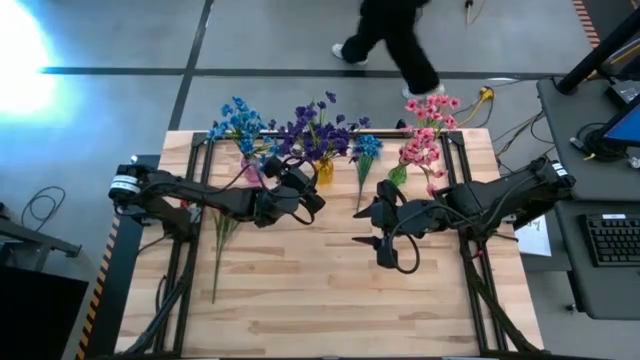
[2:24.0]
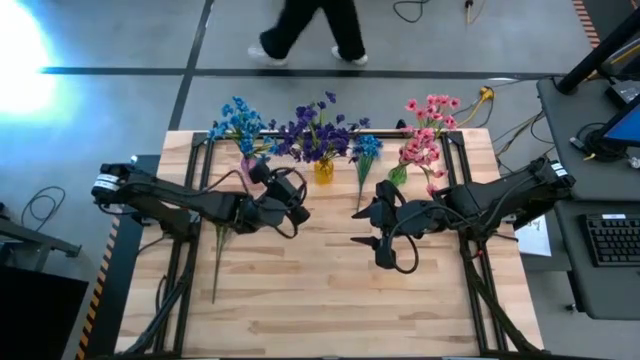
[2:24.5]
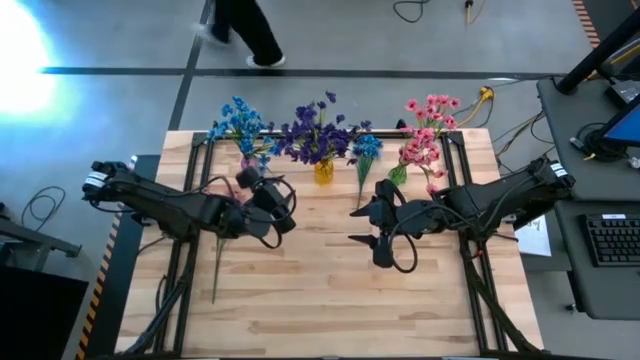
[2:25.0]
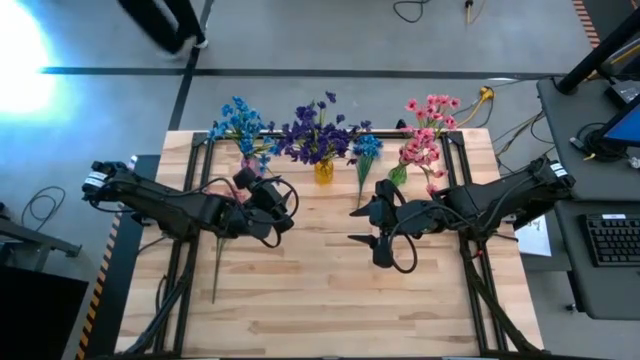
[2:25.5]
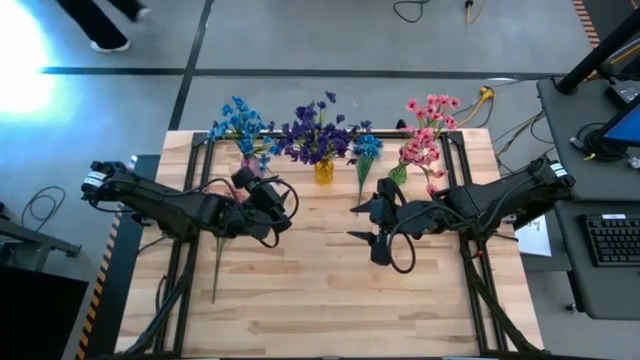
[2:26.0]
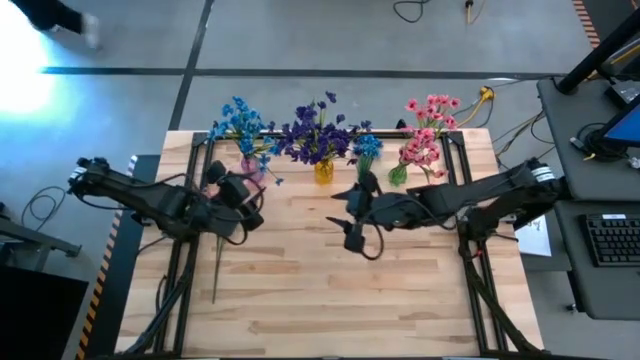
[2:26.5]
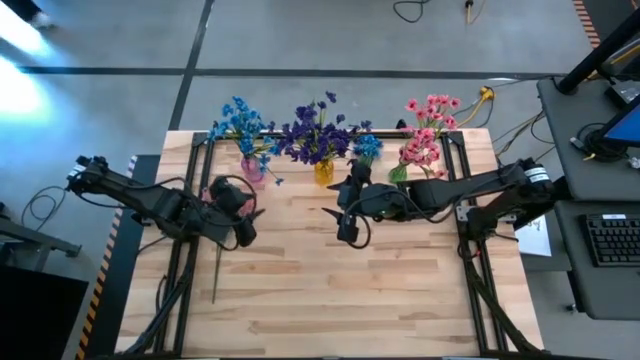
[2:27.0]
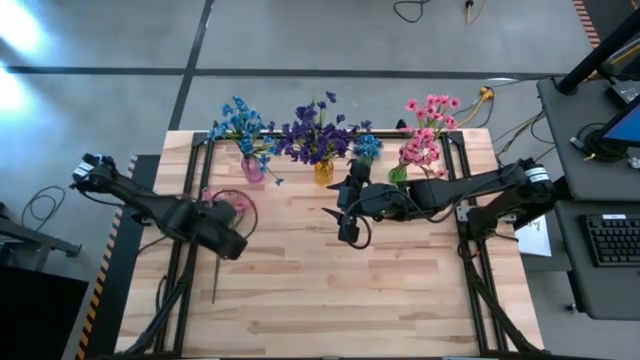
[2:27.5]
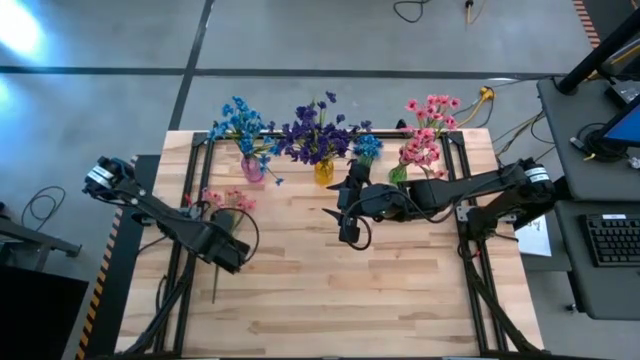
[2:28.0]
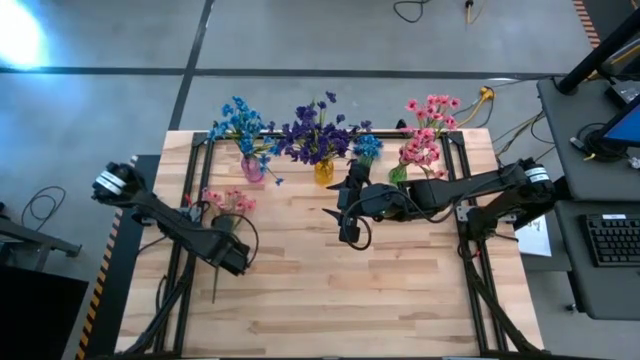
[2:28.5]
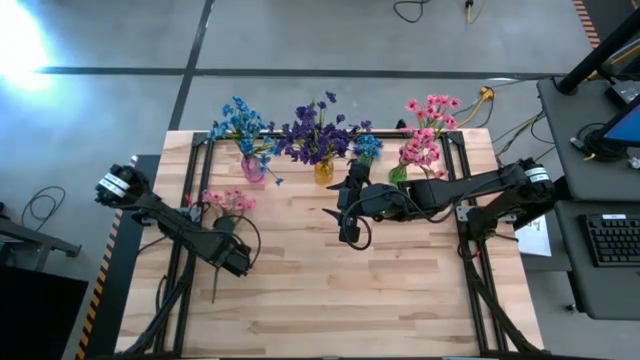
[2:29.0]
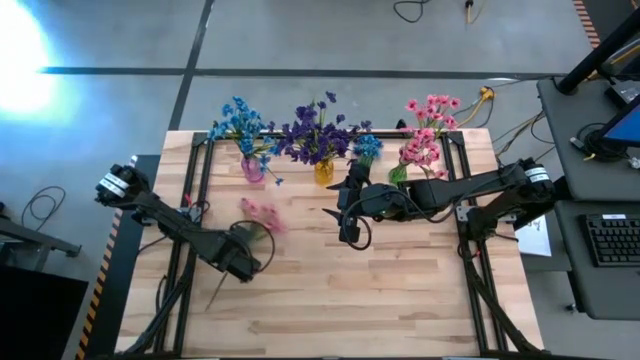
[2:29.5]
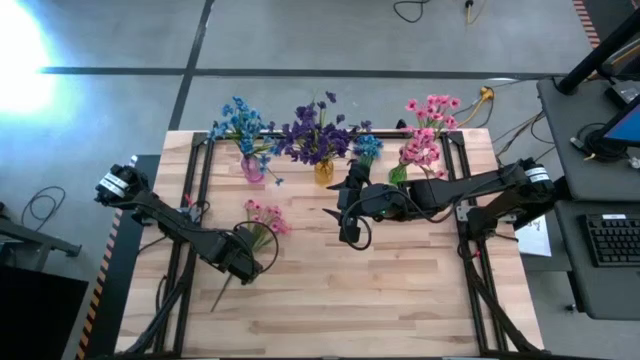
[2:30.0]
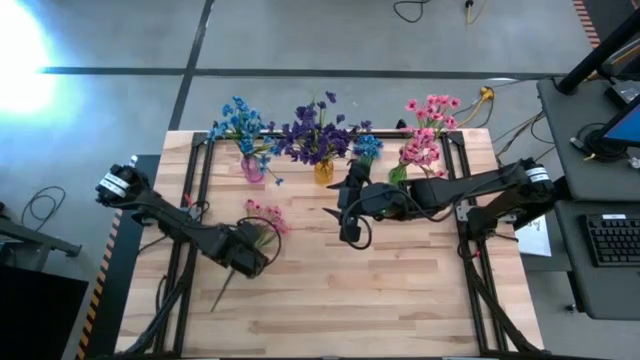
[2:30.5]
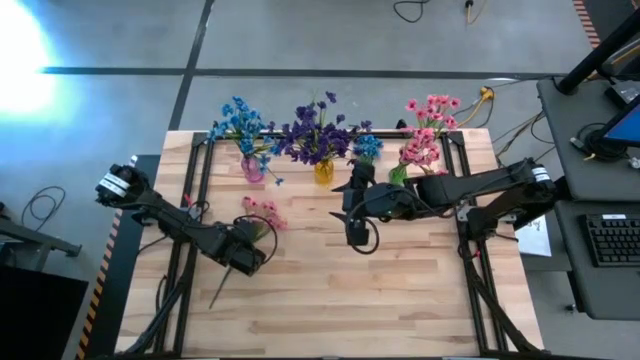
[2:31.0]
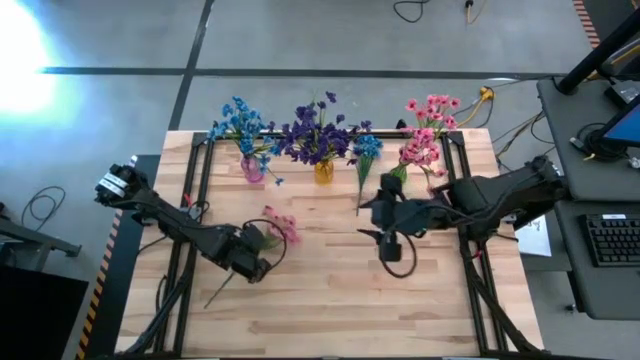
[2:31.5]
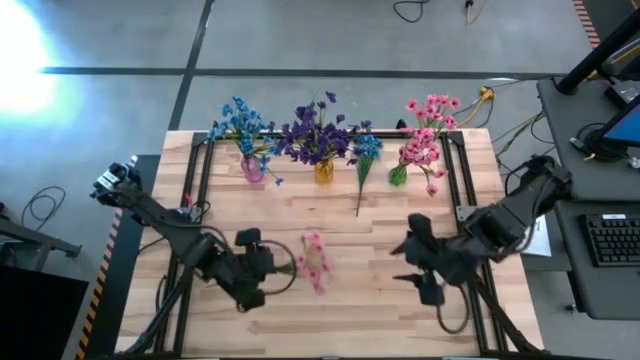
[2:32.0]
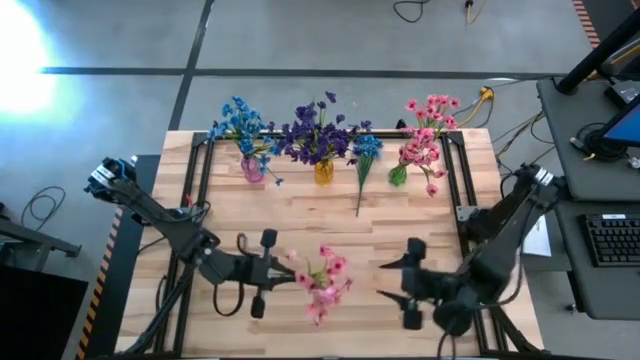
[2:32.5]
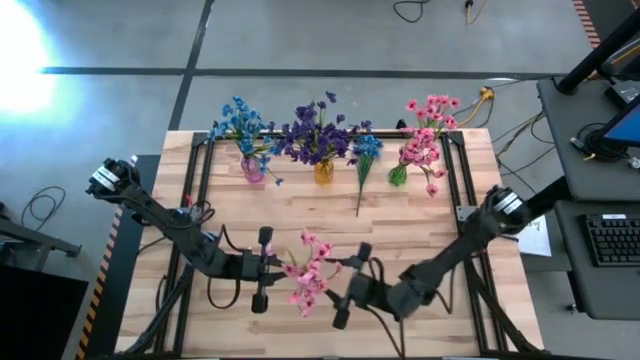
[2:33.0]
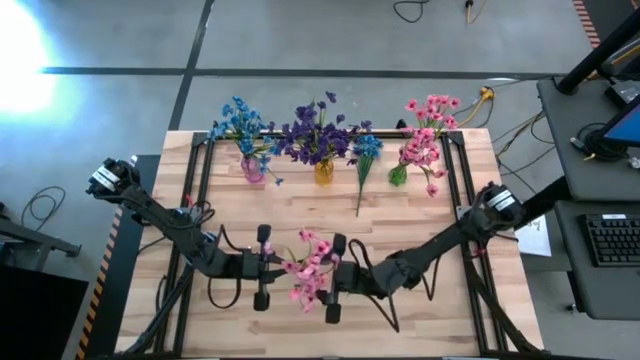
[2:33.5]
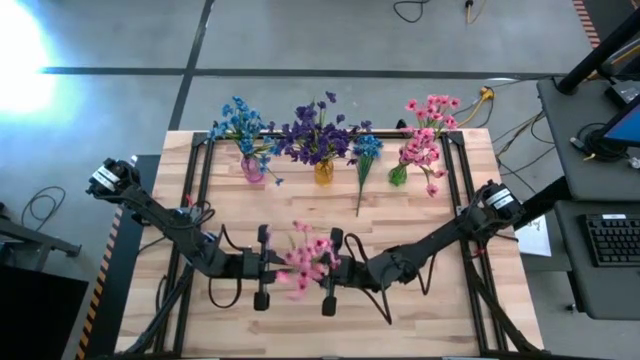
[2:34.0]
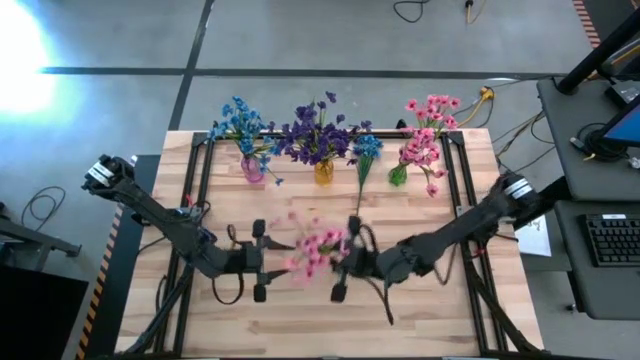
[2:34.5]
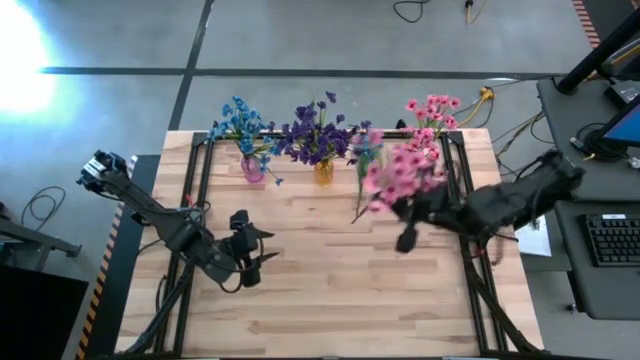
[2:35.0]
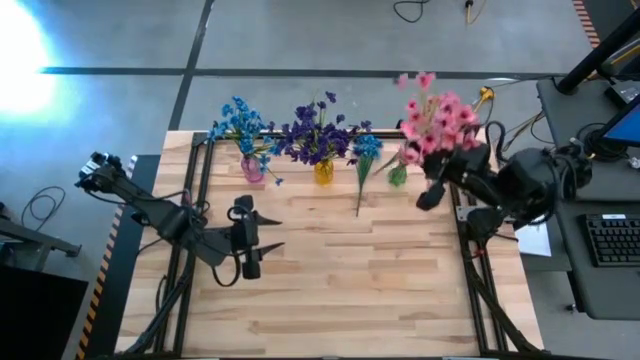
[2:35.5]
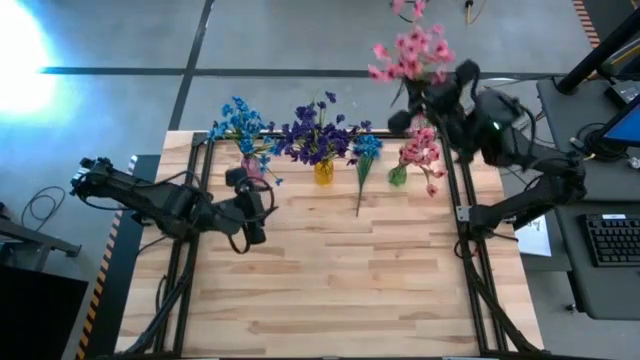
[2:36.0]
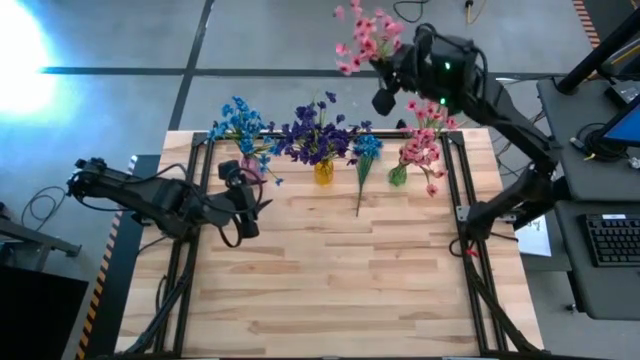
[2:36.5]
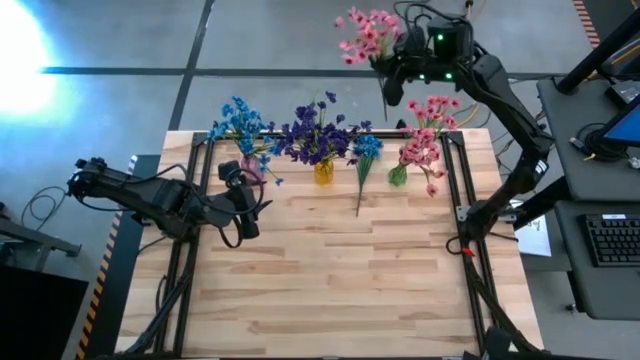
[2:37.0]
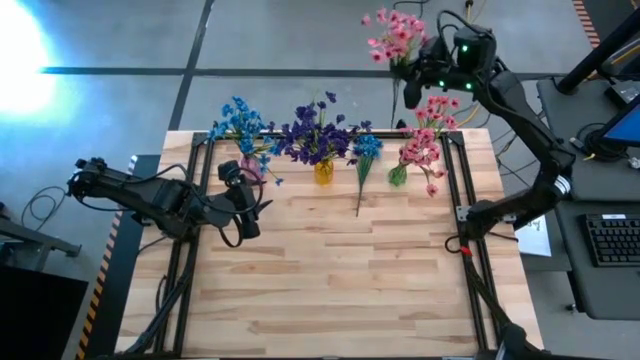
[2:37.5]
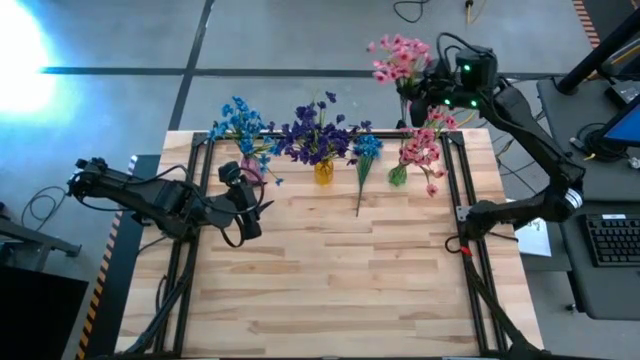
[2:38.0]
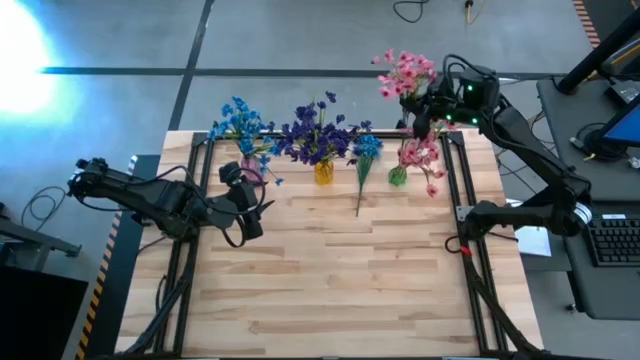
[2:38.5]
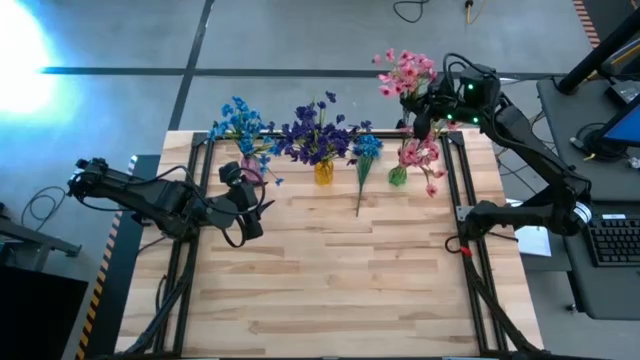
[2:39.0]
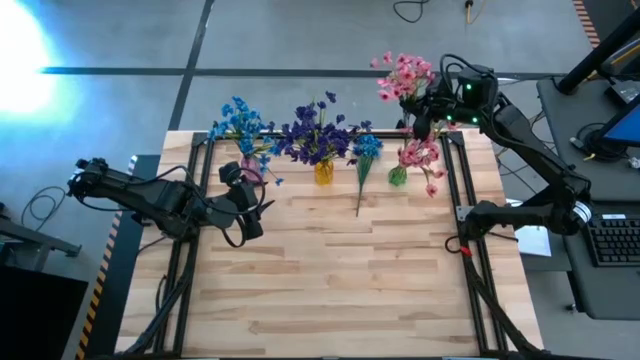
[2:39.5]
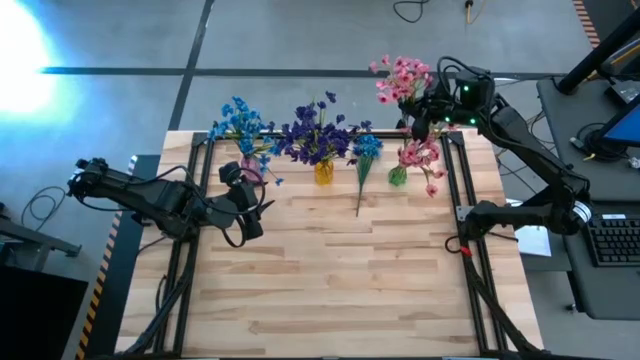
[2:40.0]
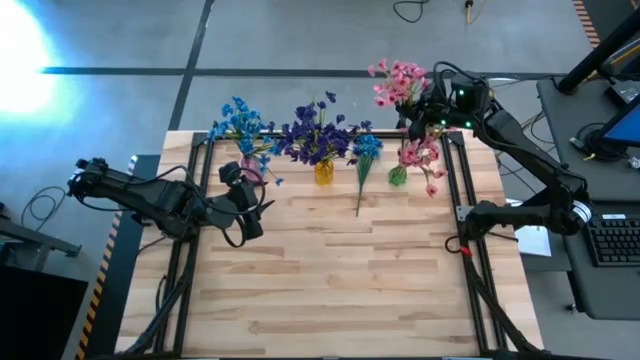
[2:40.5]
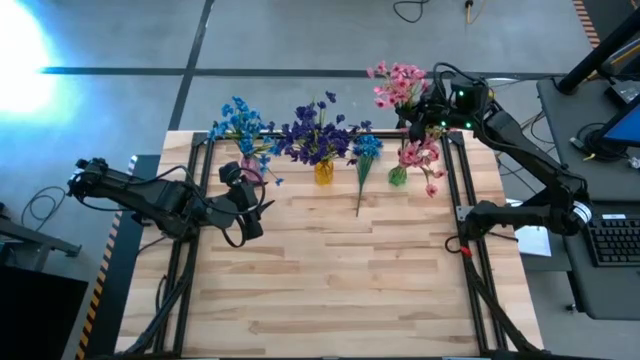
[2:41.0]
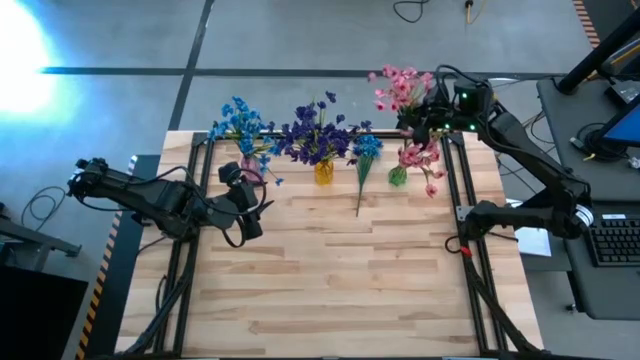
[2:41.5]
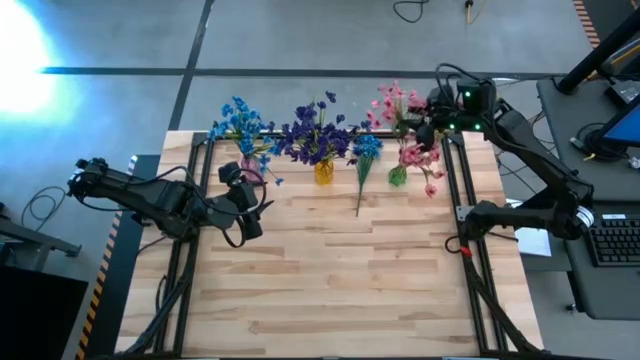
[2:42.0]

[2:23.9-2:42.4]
Task: Sort flowers into vase by color
Put the pink flowers into the green vase

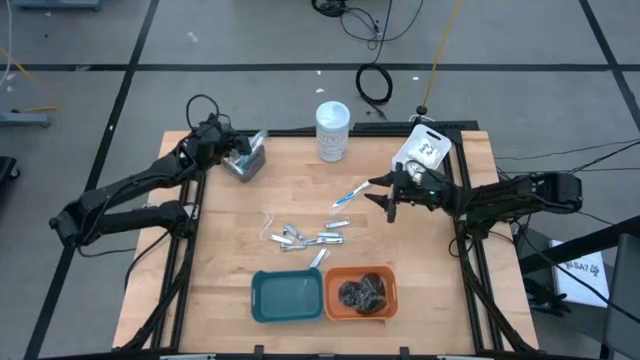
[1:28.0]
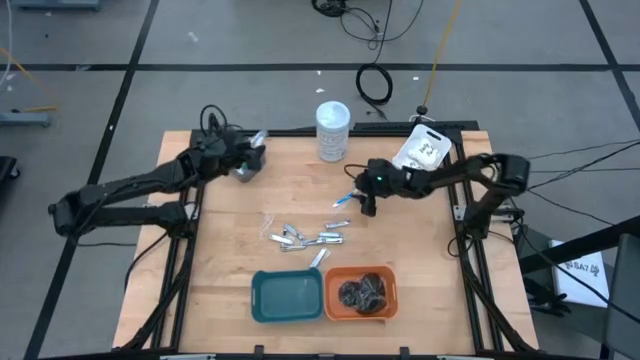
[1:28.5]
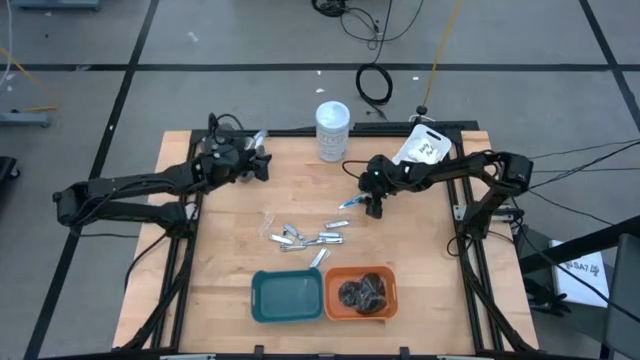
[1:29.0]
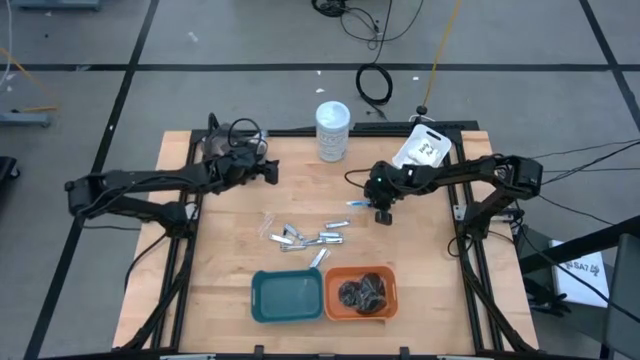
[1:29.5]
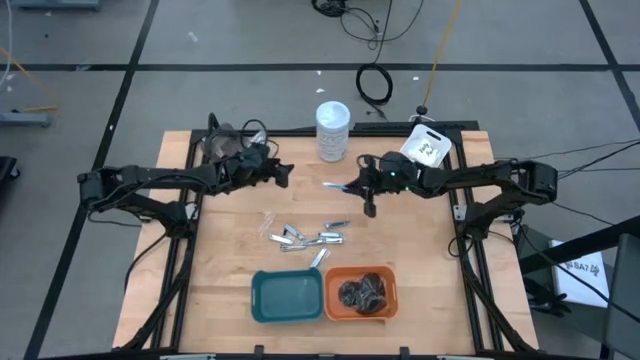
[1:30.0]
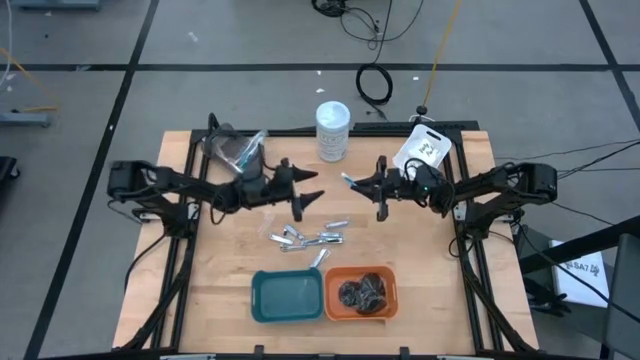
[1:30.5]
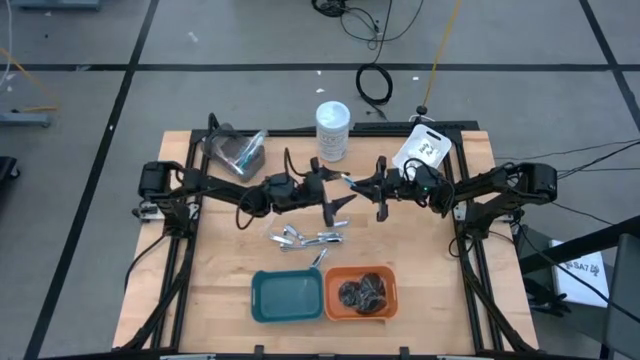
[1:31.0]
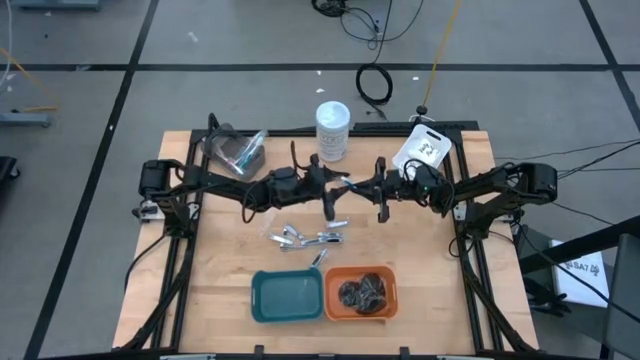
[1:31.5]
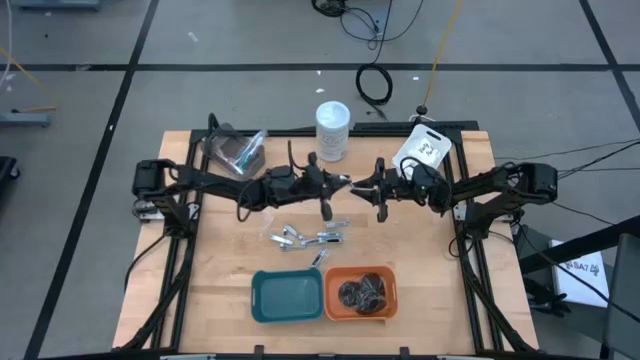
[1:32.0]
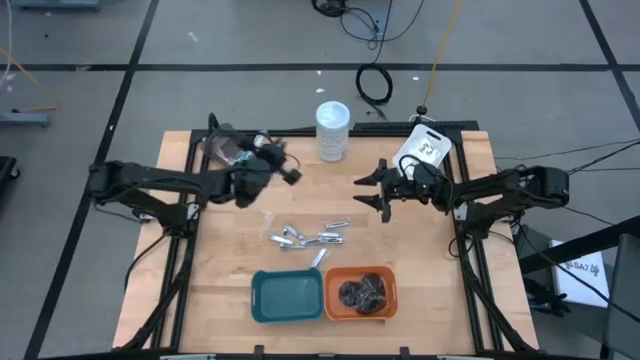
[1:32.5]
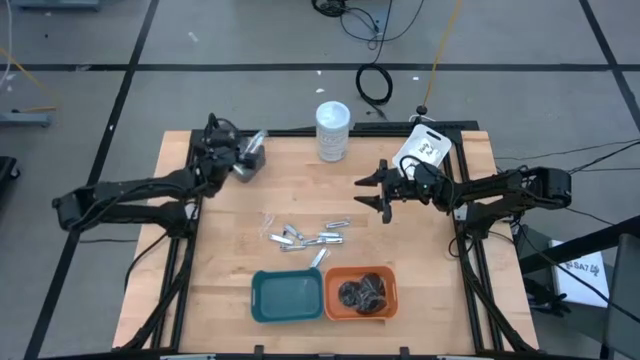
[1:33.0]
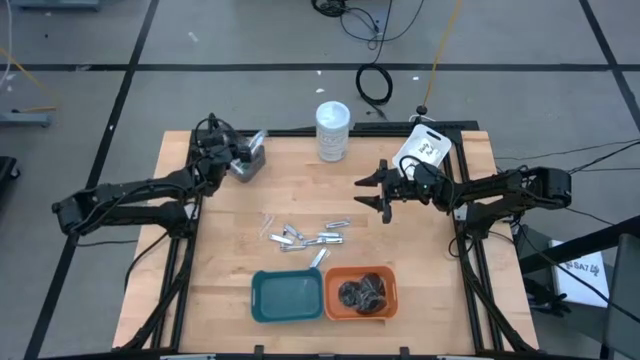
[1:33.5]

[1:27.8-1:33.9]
Task: Pick & Place Travel size toiletries
Put the blue toothbrush into the black bin
